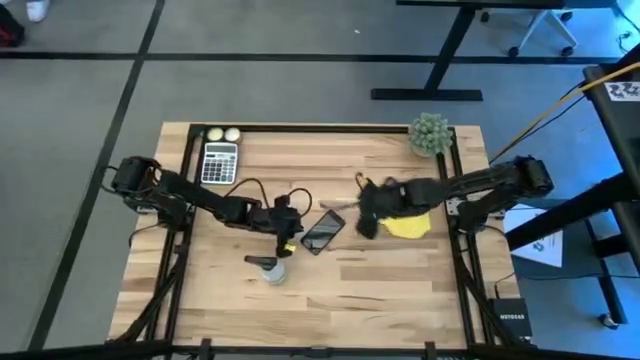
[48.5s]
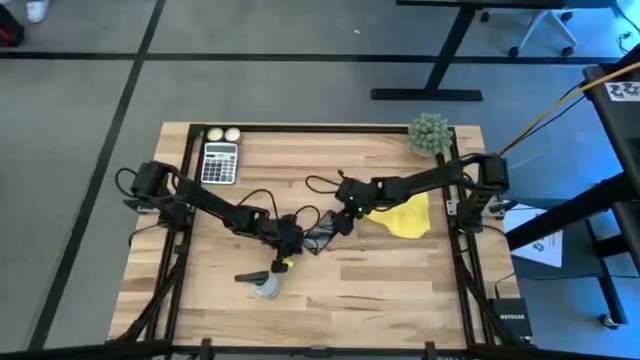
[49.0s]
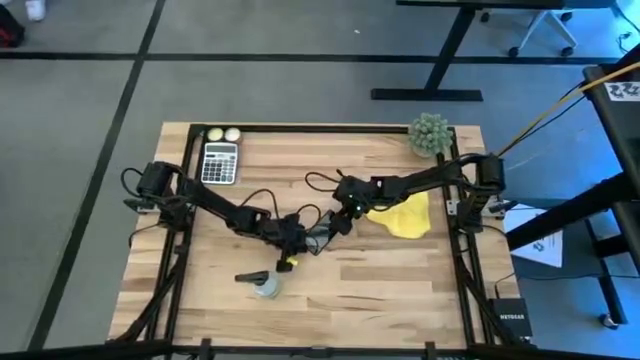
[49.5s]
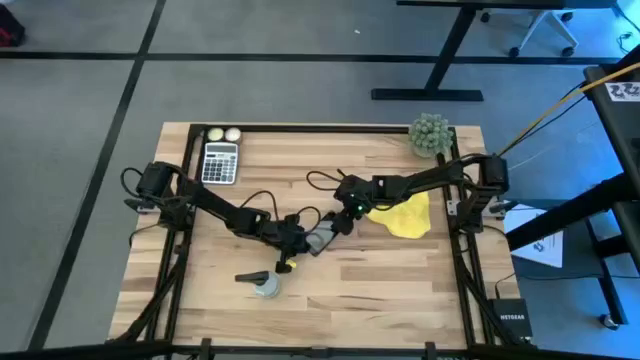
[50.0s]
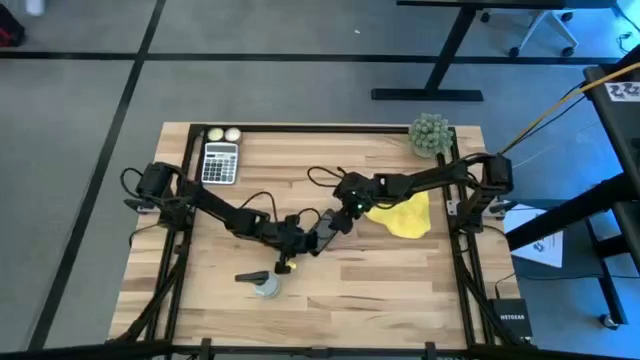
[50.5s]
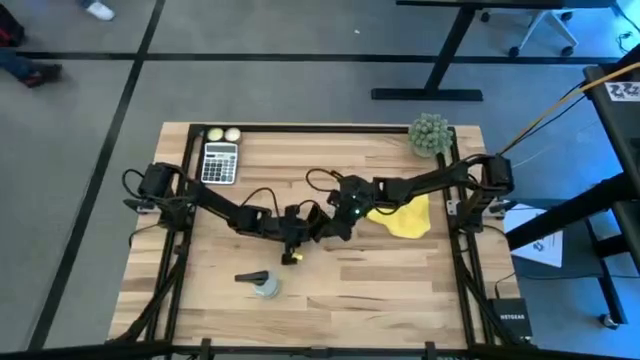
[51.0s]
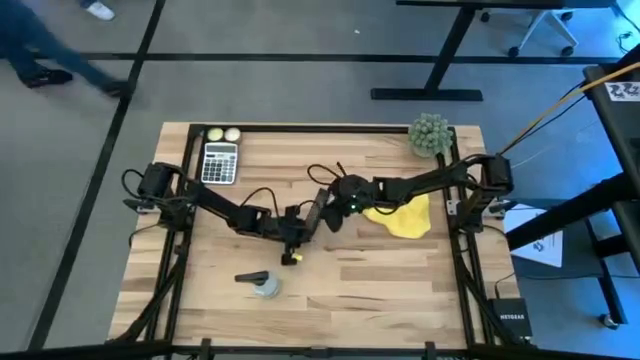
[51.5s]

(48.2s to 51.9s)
Task: Apply microfiber cloth
Spray the back of the cellphone using the spray bottle

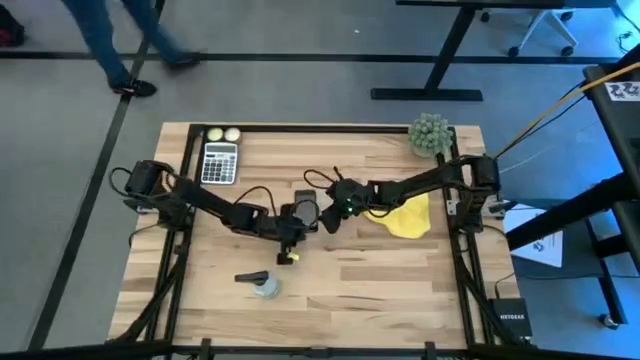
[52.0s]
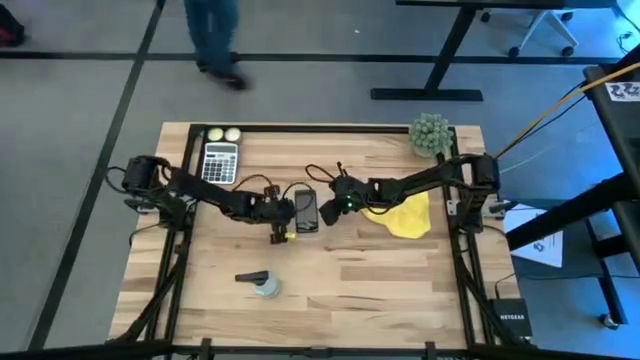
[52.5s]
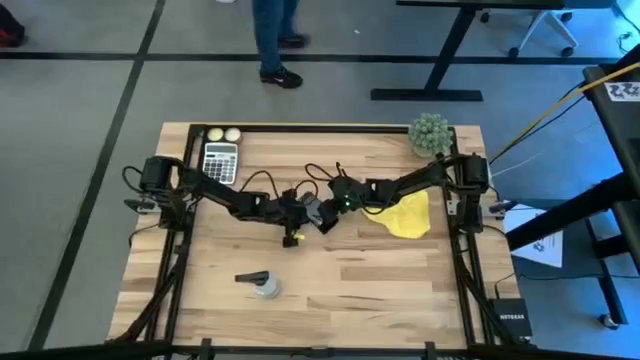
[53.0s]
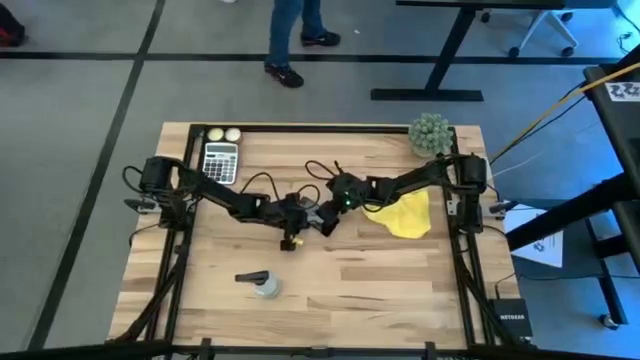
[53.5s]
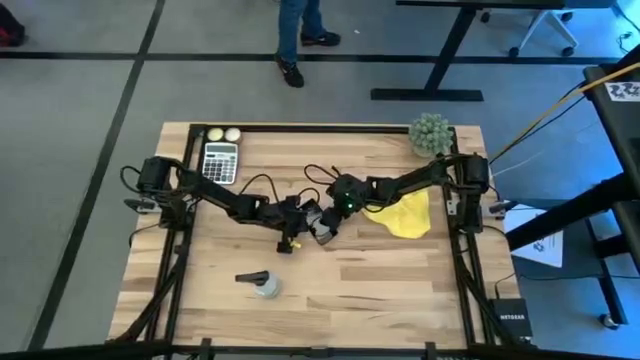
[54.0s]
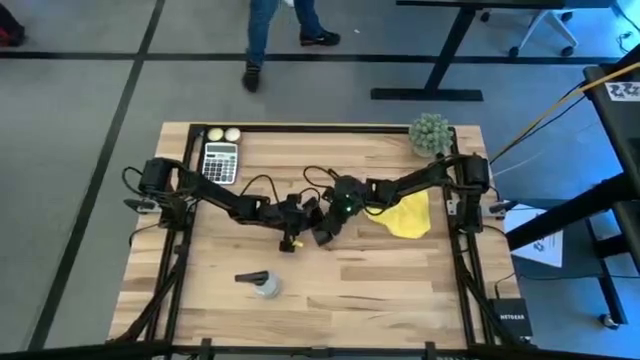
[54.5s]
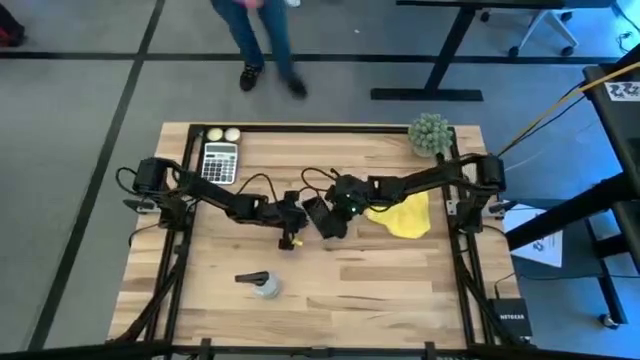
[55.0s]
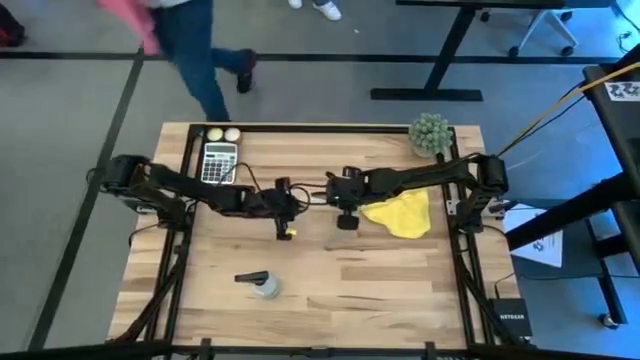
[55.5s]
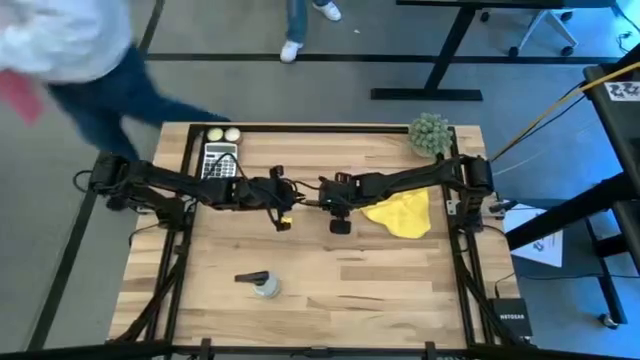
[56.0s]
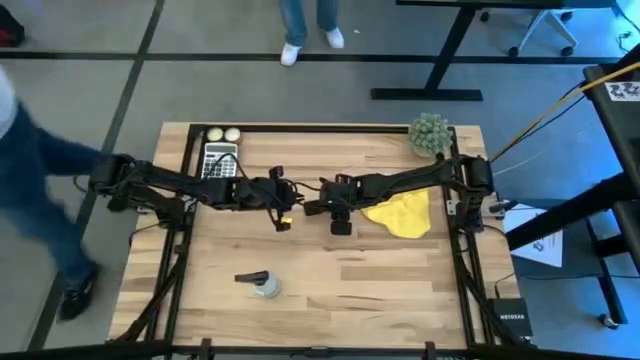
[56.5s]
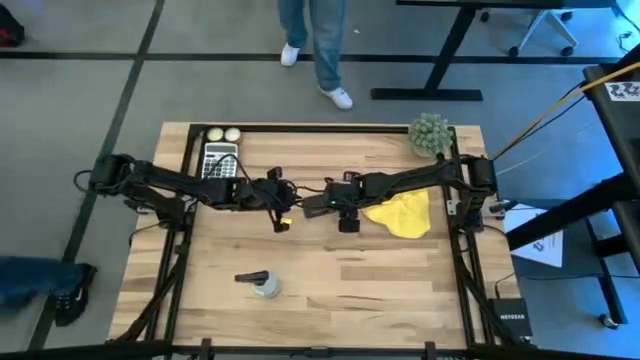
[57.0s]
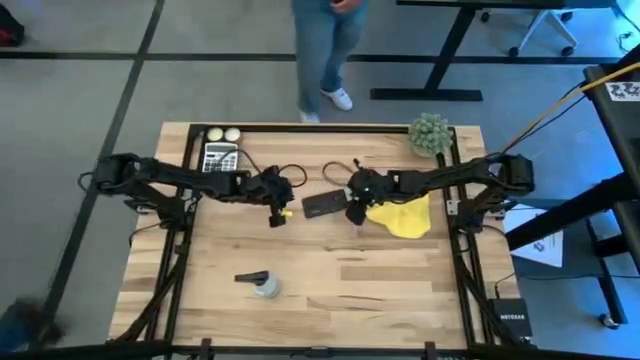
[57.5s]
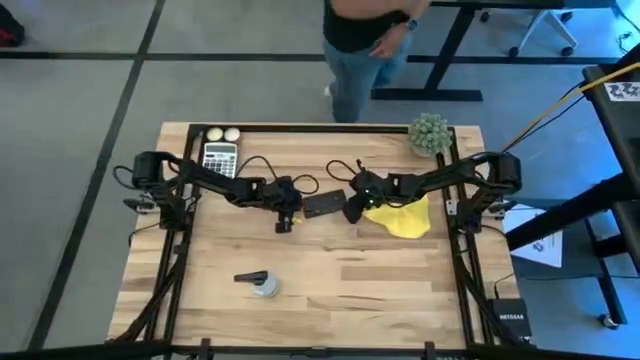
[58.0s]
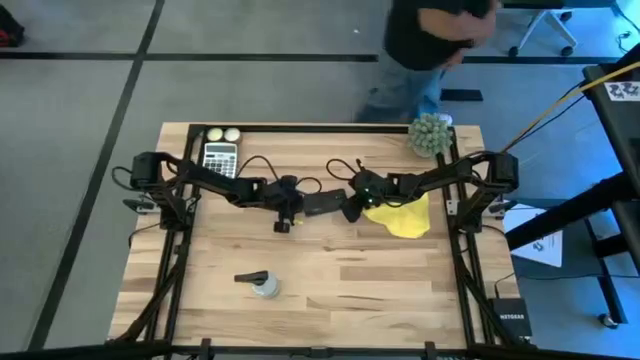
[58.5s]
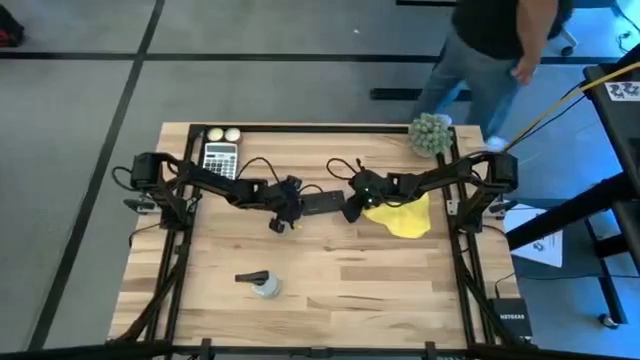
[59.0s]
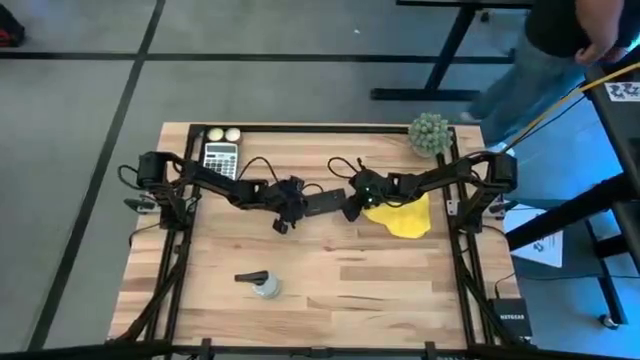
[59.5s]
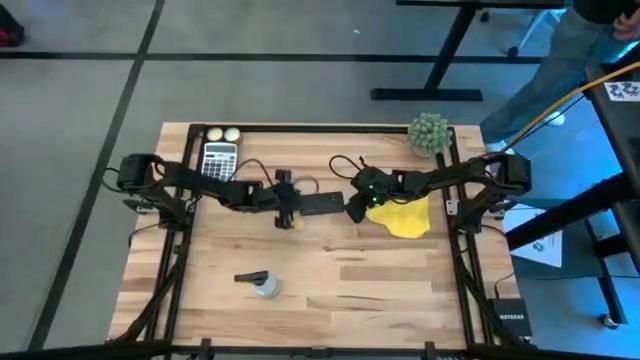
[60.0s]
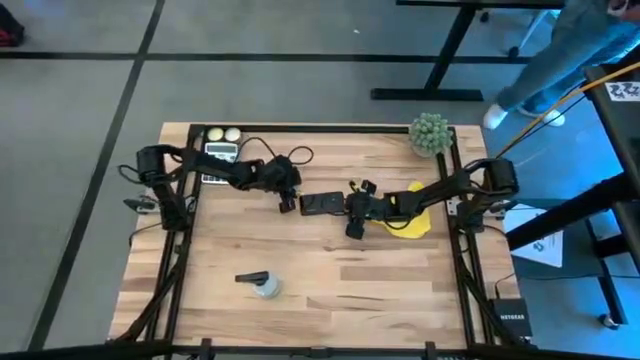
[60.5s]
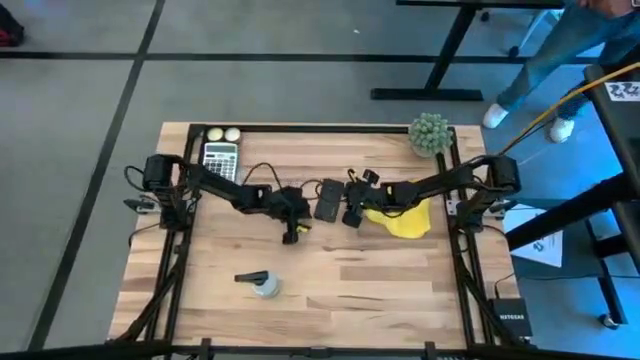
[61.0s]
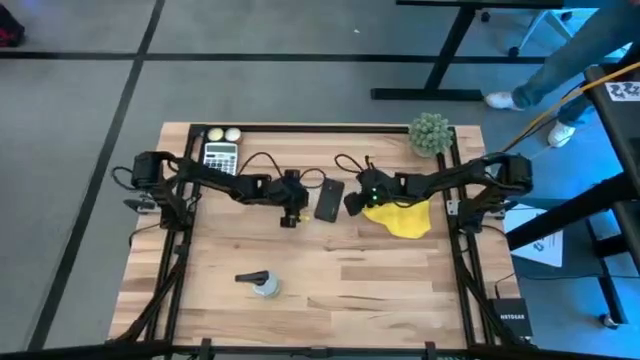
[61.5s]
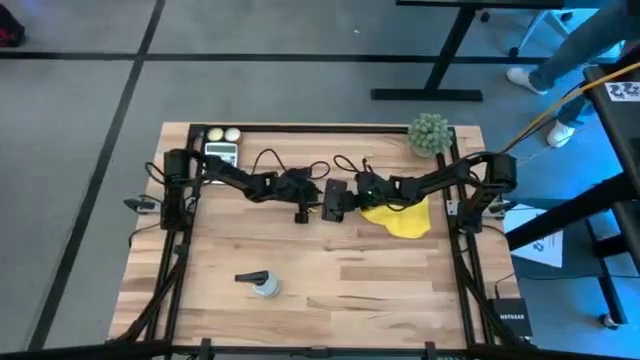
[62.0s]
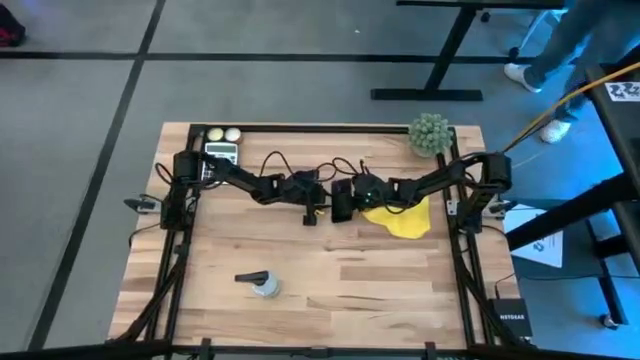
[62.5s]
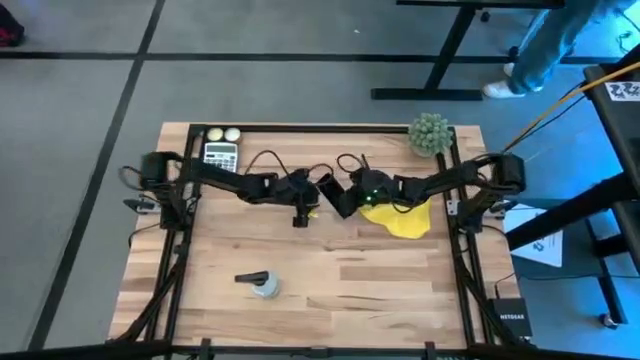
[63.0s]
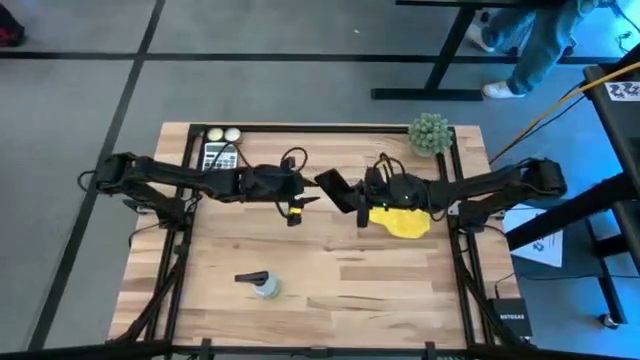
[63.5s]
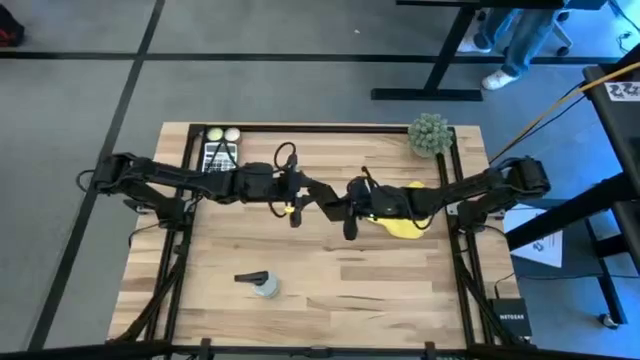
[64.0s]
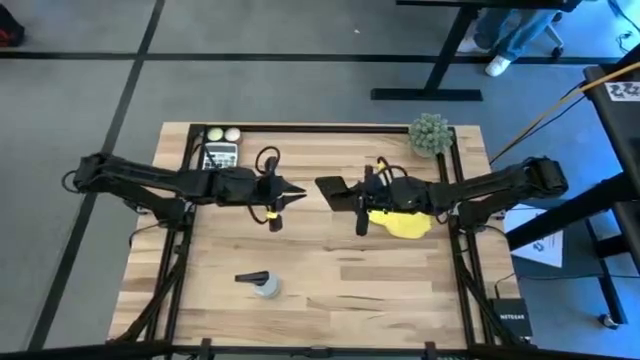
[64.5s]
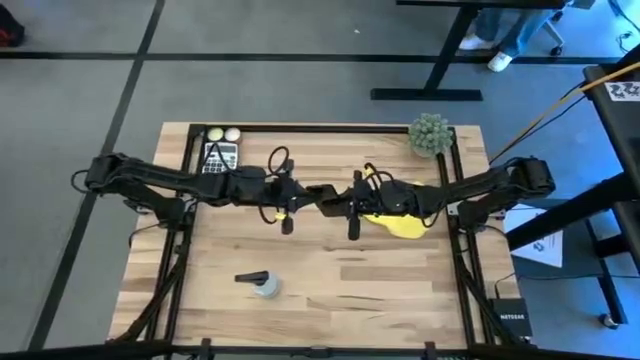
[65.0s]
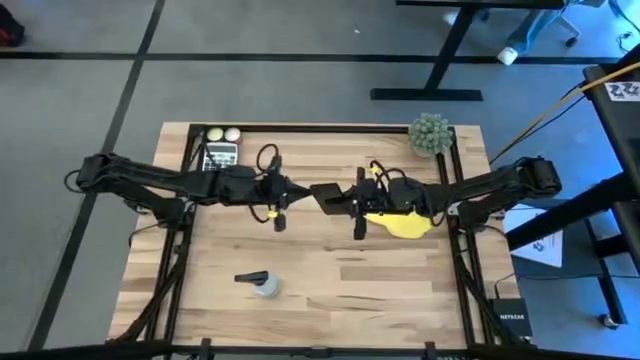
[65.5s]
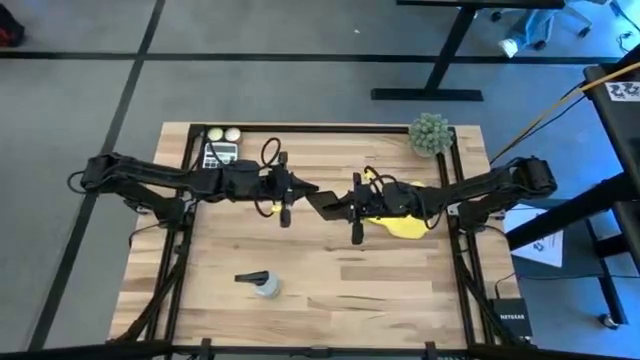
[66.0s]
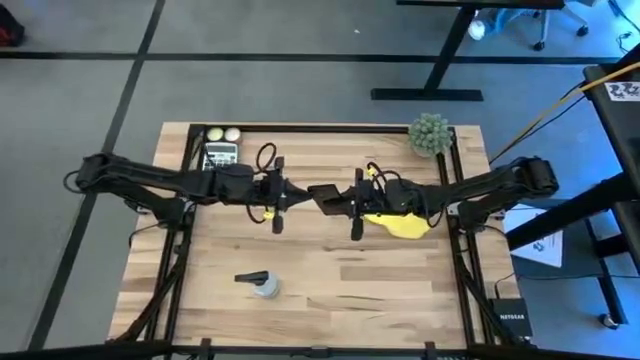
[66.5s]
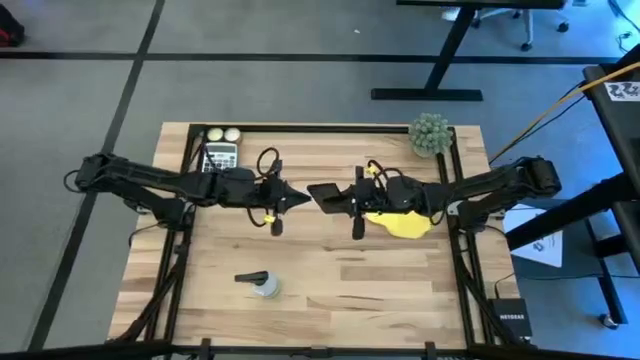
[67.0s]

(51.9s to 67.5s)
Spray the back of the cellphone using the spray bottle

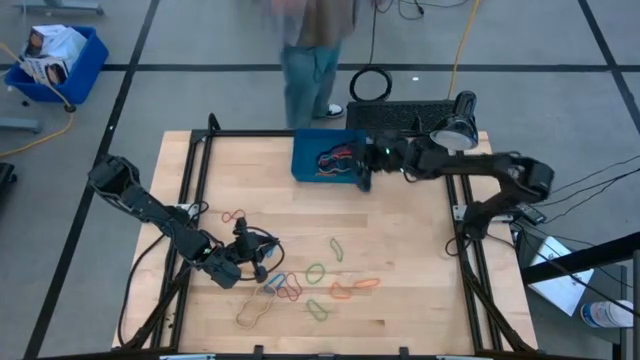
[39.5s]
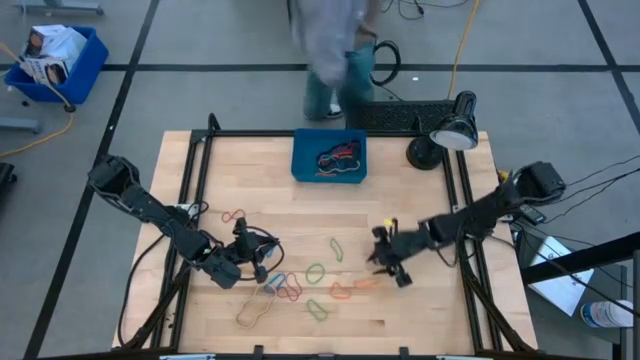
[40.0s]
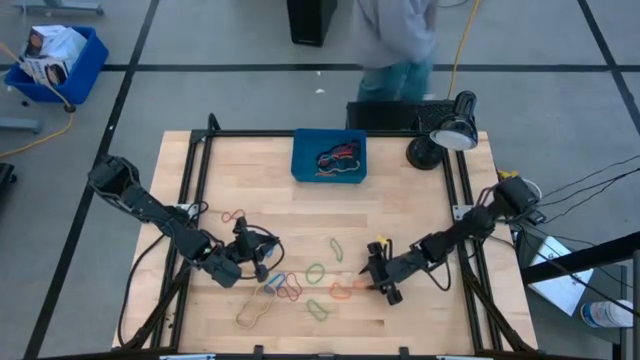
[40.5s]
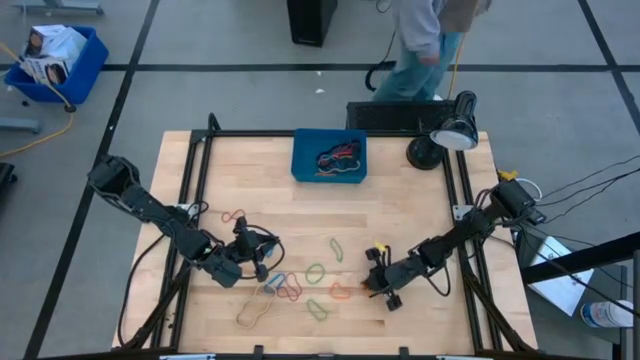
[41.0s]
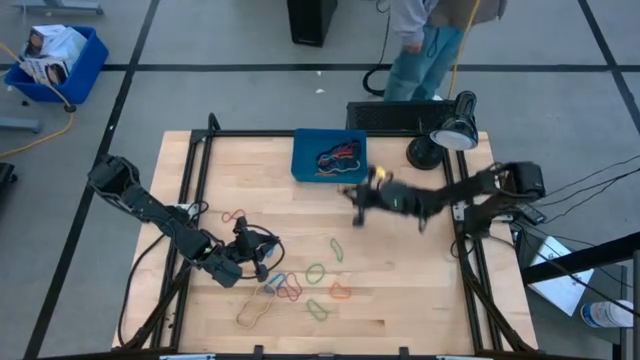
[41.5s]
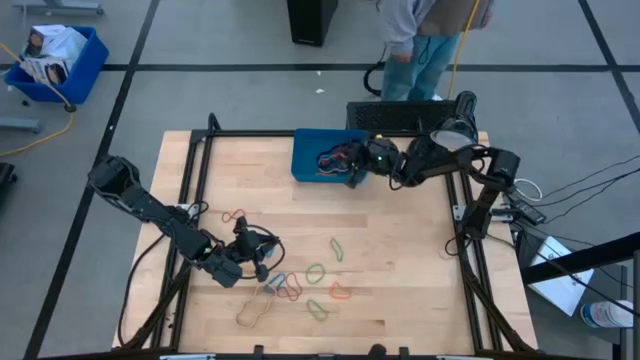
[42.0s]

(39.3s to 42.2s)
Task: Pick and place rubber bands into bin
Put the orange rubber band into the blue bin
